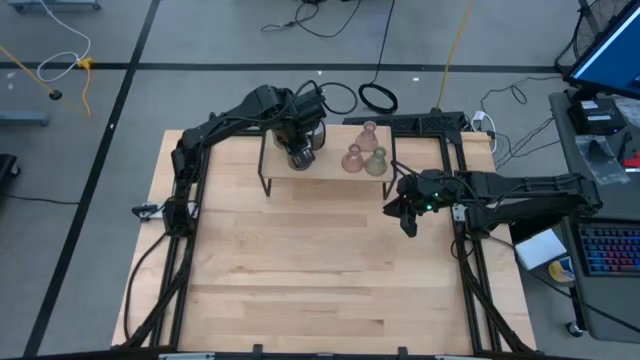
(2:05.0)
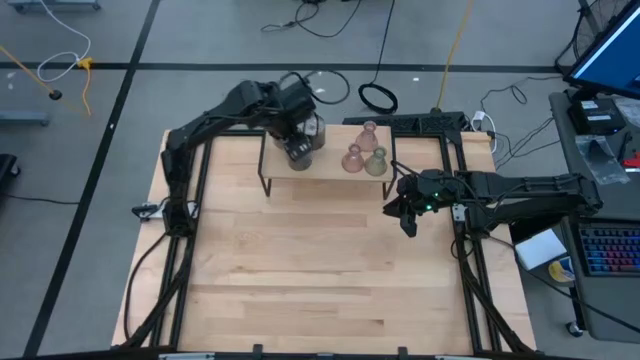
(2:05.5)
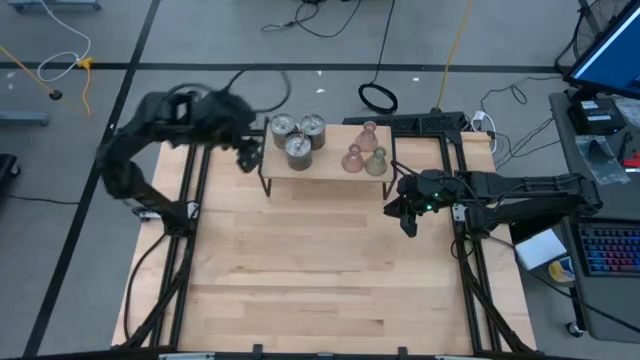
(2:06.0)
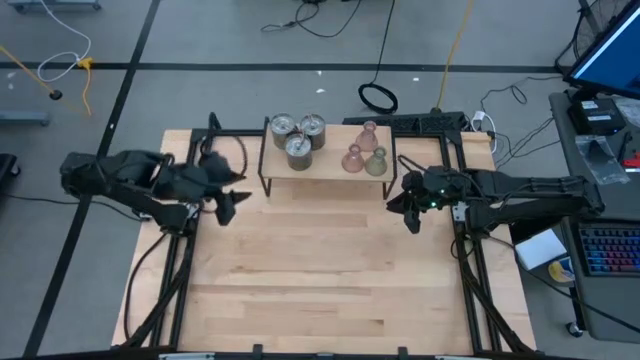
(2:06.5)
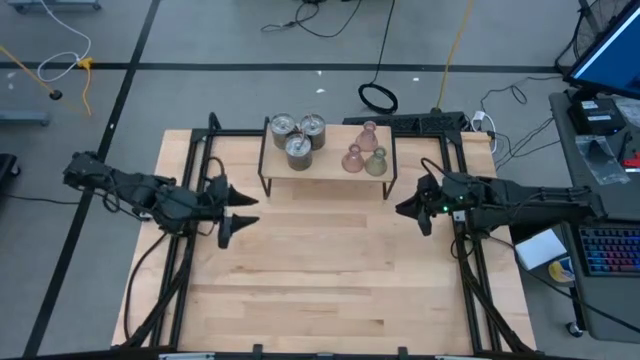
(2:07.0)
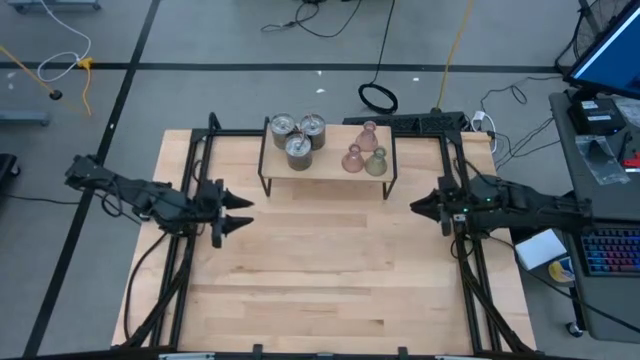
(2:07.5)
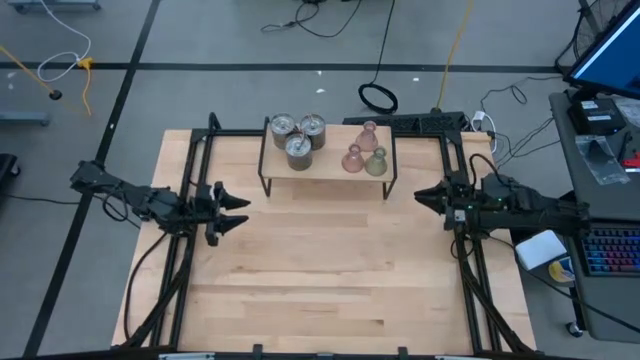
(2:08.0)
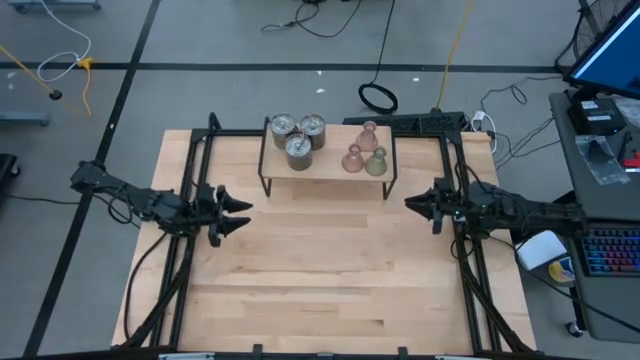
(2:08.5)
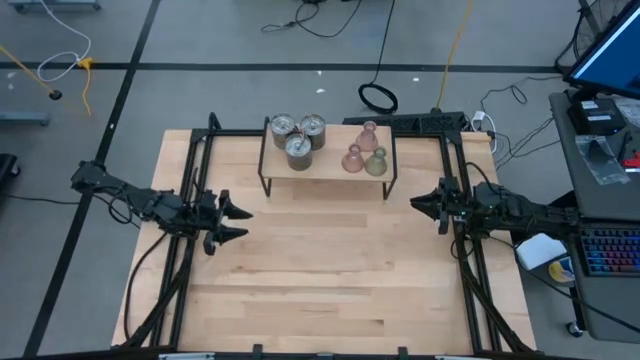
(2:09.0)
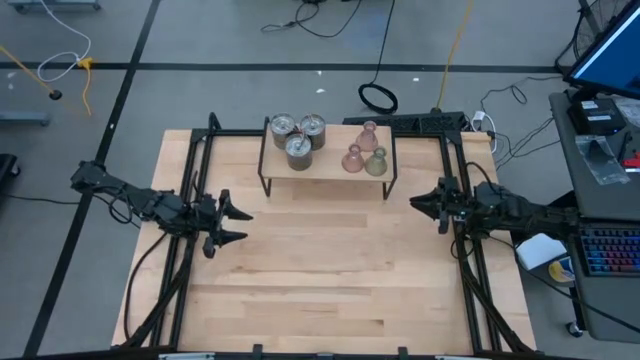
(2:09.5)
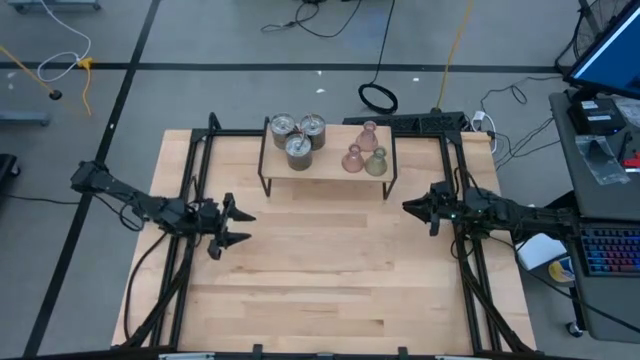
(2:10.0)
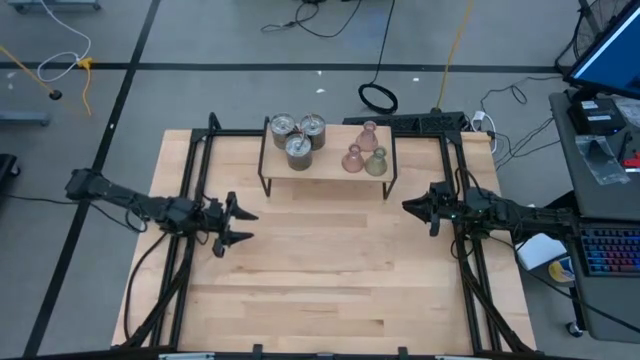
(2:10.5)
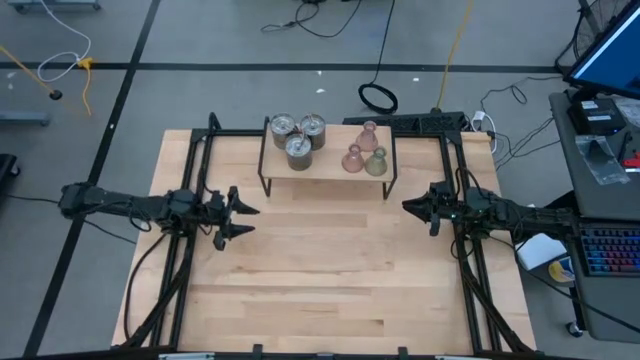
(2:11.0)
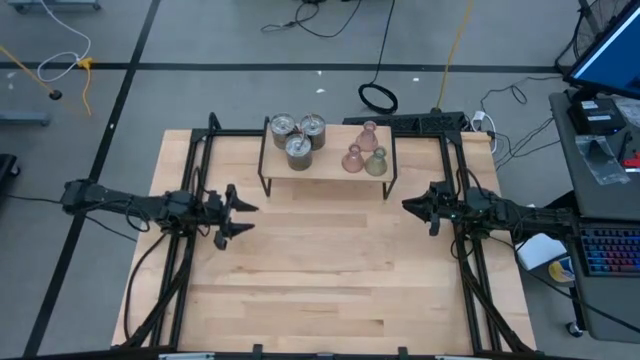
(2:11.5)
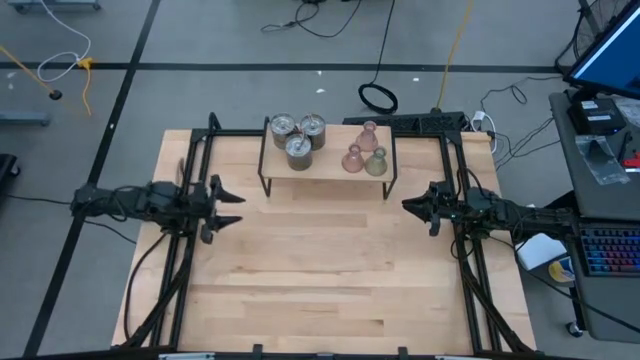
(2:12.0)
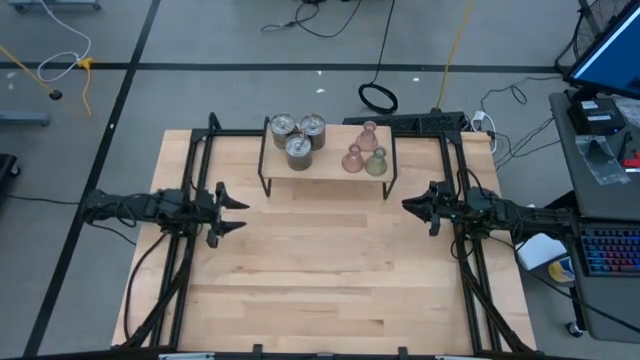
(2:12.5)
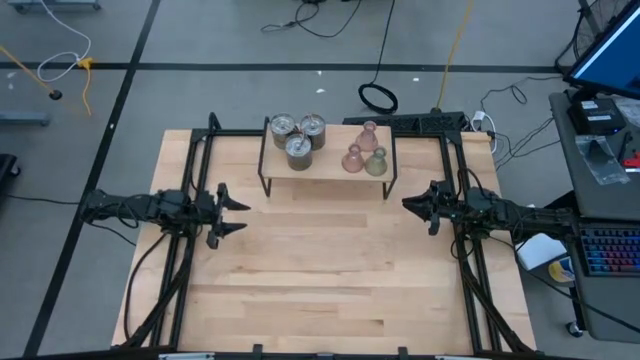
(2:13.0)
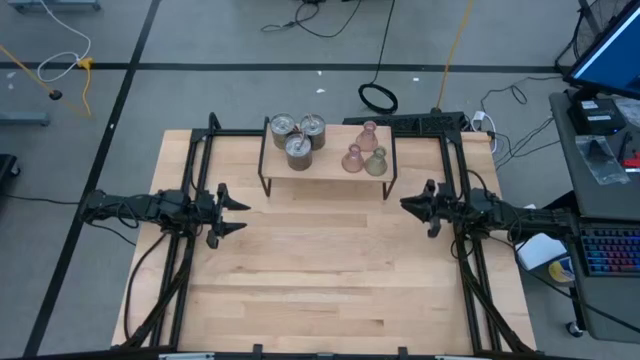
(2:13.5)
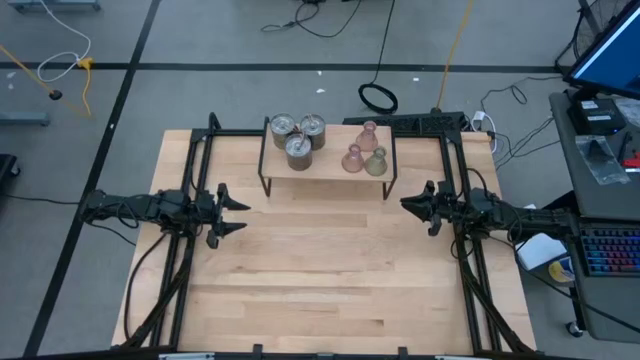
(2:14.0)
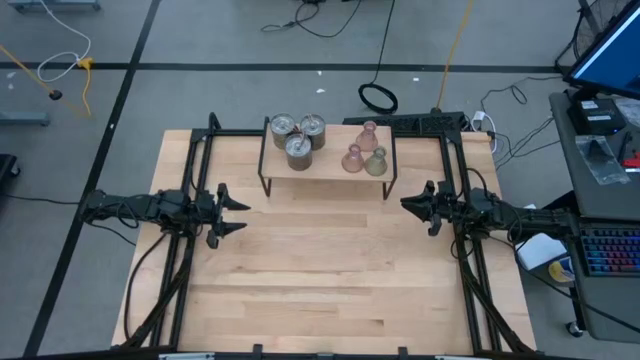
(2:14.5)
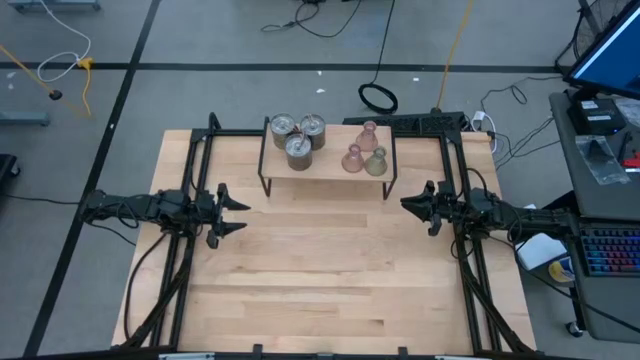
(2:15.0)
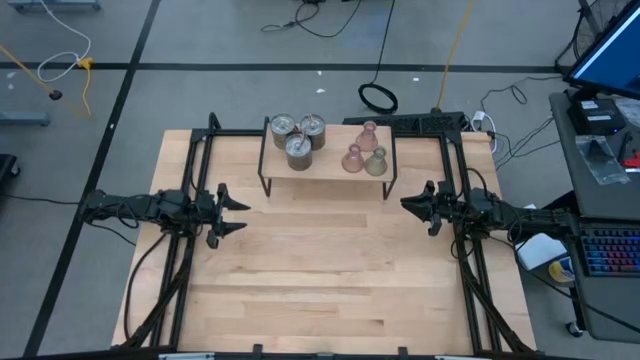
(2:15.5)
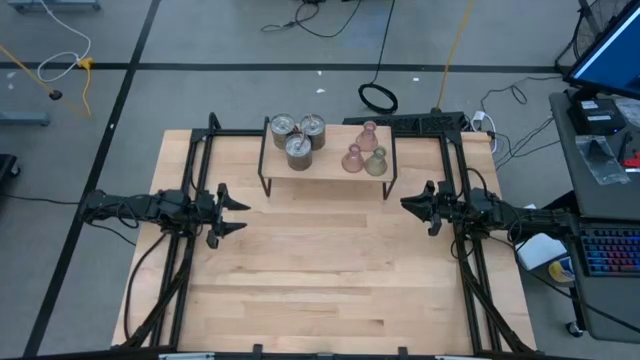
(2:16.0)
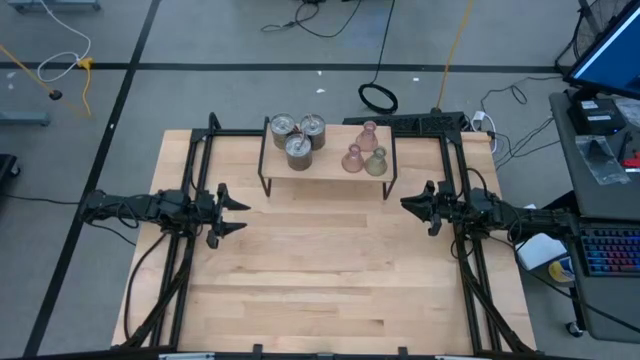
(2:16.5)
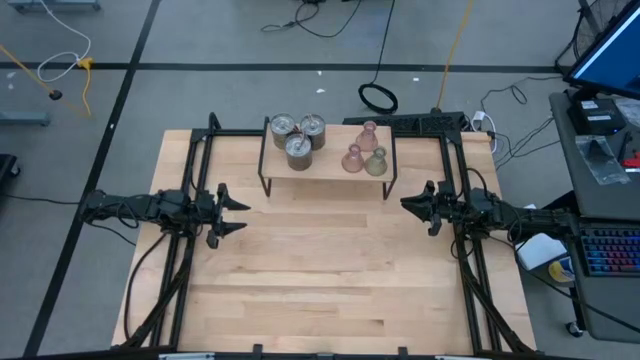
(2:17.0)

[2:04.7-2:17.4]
Task: Pick & Place candle stick holders
Return to Home Position

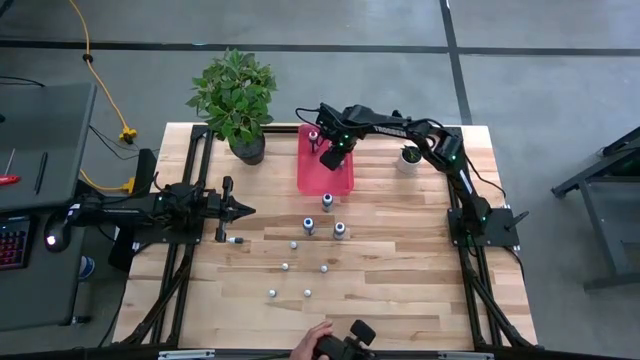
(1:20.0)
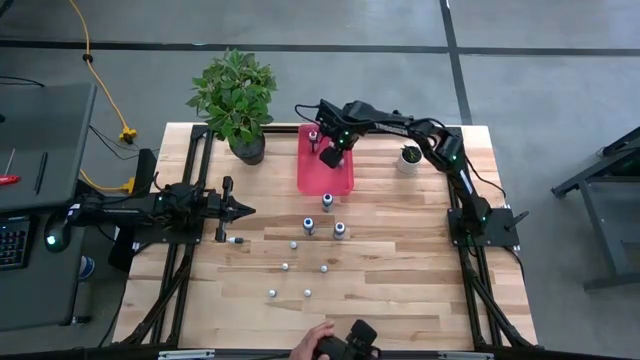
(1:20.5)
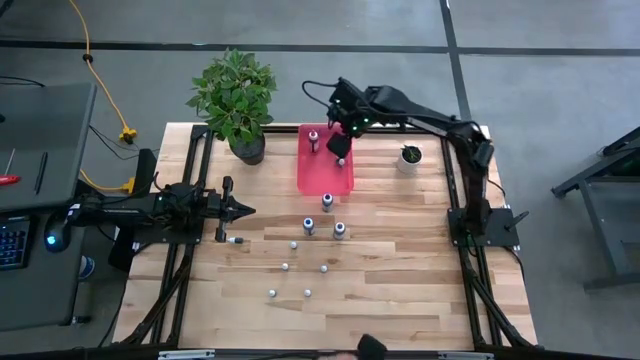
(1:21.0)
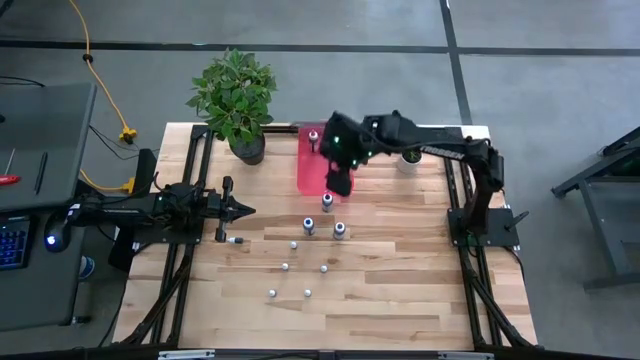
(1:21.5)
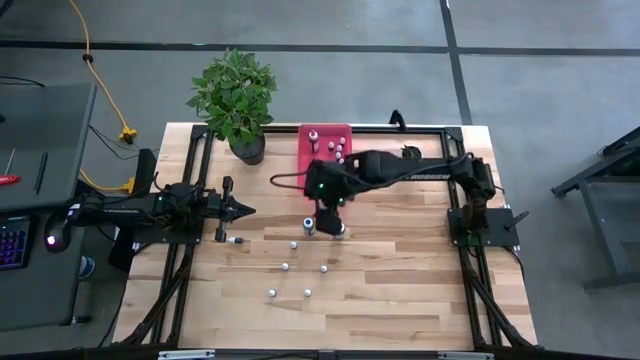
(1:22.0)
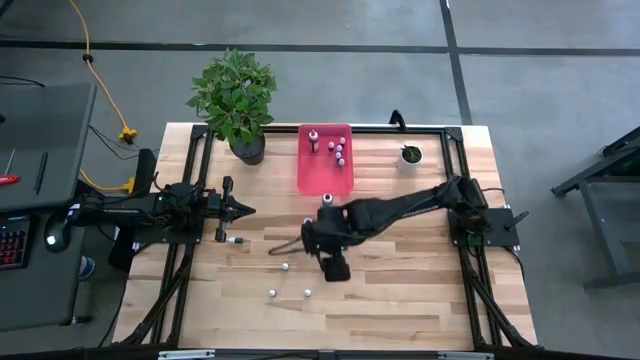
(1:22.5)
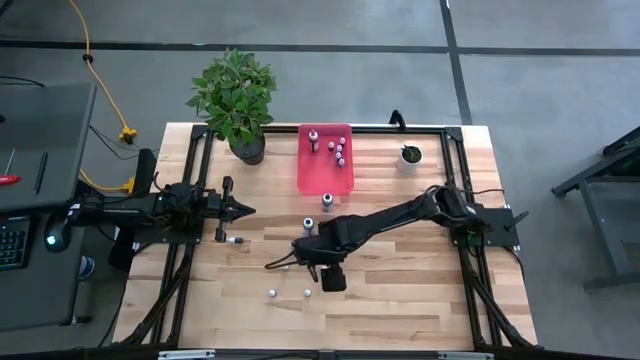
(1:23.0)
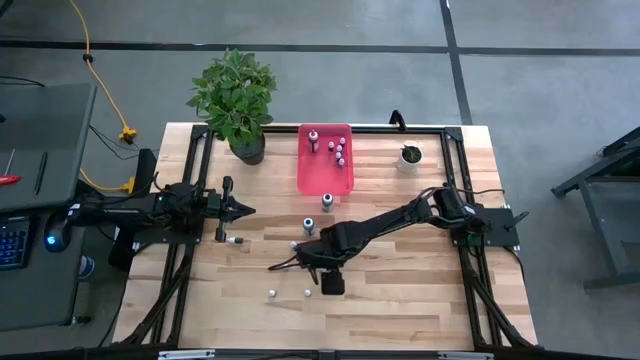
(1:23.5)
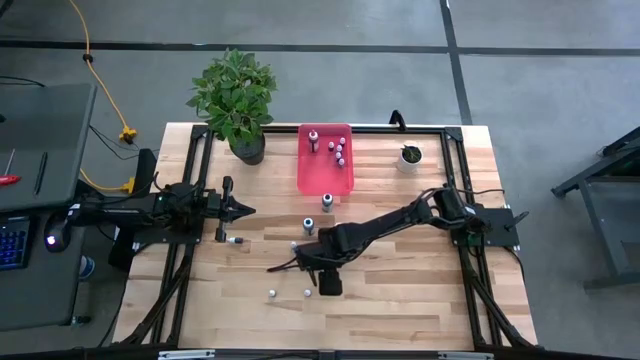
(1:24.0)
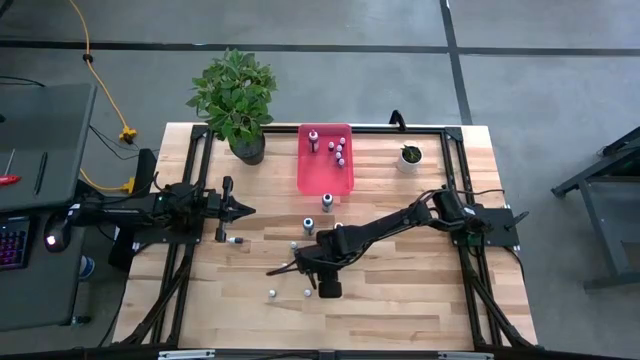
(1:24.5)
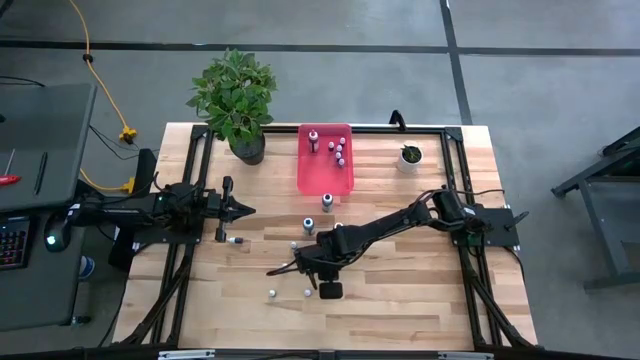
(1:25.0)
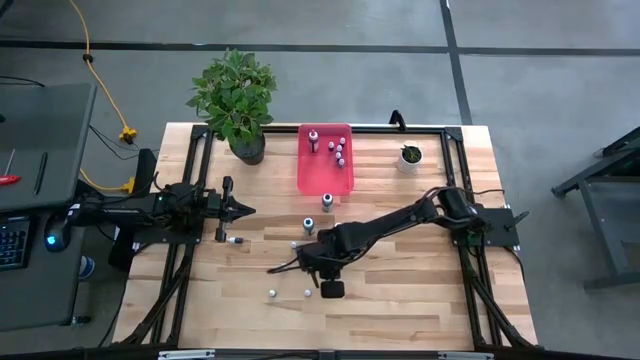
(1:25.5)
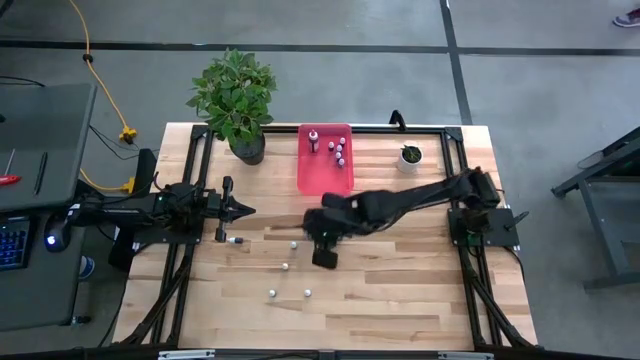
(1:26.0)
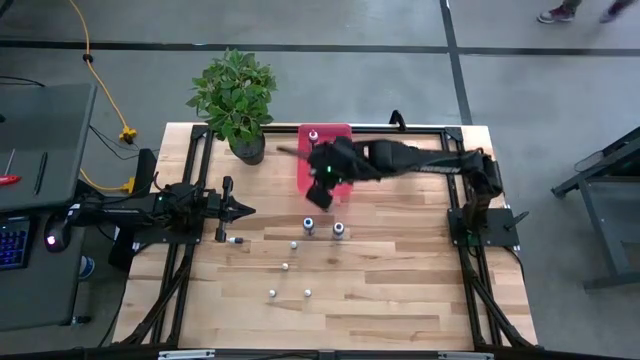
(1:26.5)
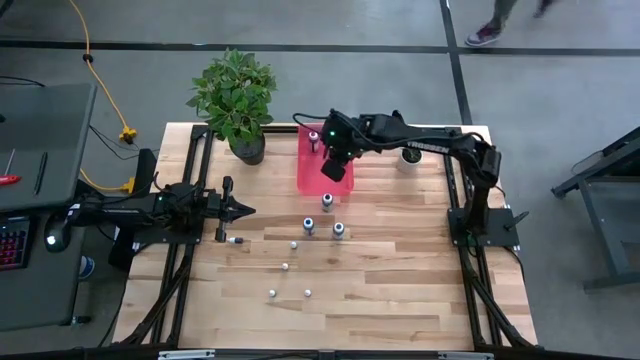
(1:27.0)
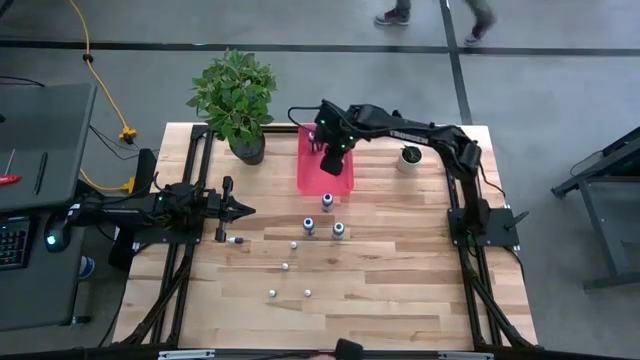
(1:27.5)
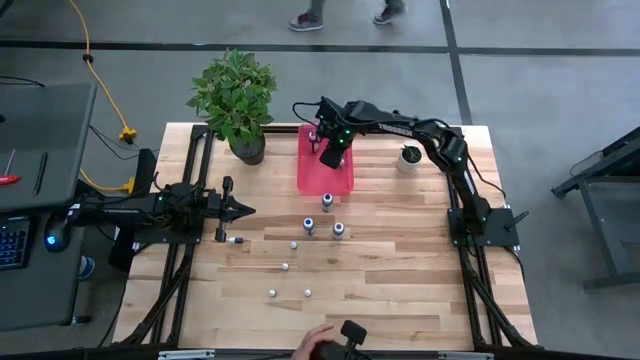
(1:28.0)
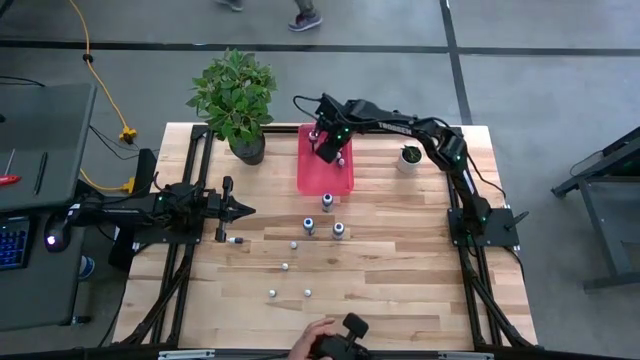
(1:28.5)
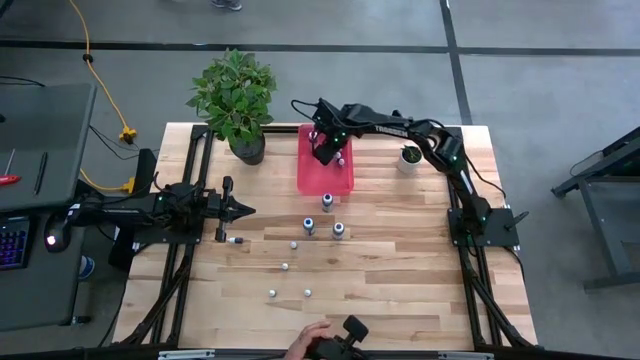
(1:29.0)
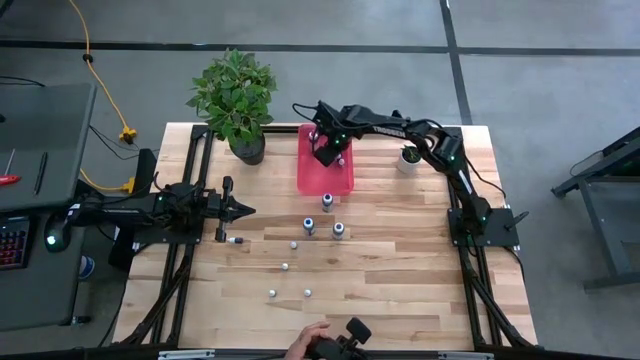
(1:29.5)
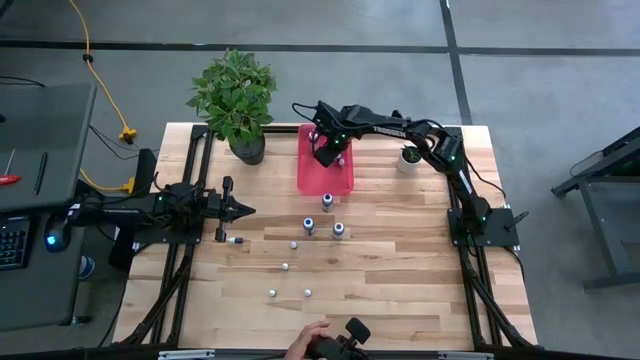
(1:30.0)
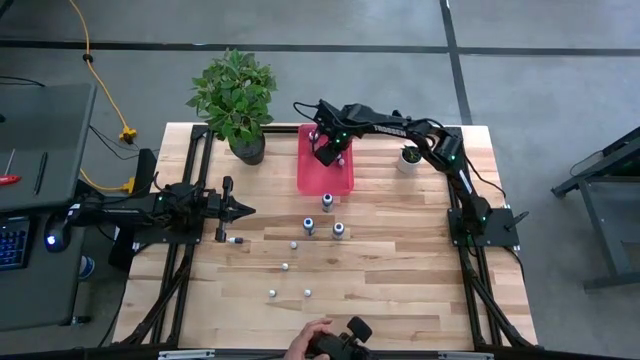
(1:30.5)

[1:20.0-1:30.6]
Task: Pick & Place food coloring
Put the green food coloring bottle into the pink bin
